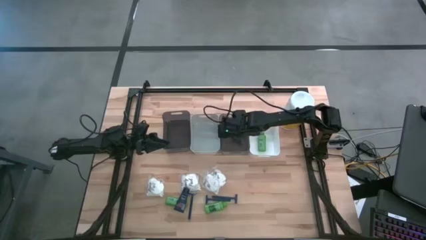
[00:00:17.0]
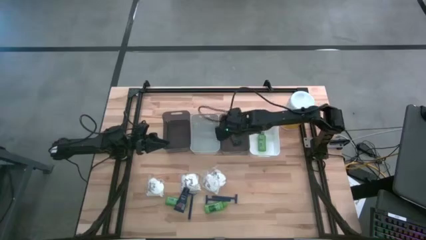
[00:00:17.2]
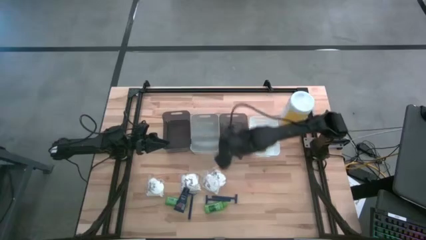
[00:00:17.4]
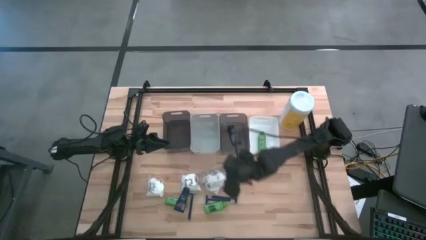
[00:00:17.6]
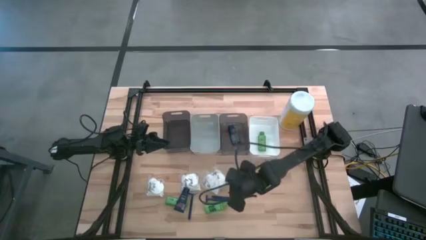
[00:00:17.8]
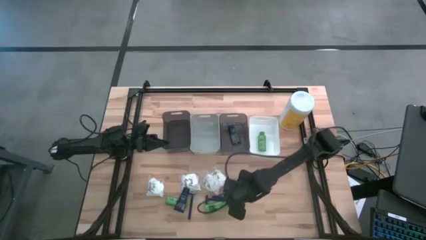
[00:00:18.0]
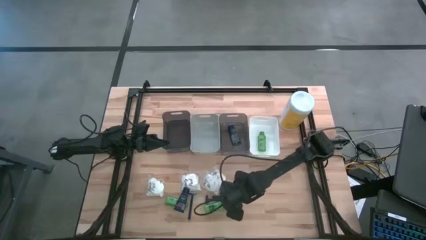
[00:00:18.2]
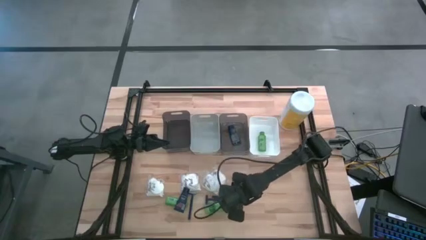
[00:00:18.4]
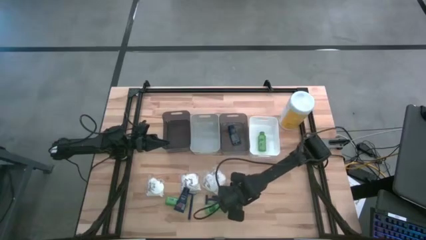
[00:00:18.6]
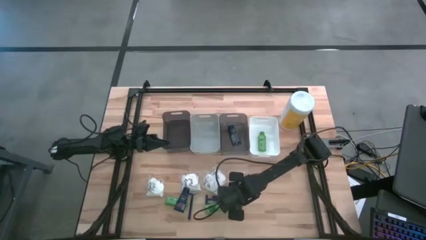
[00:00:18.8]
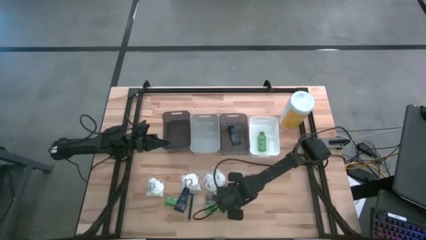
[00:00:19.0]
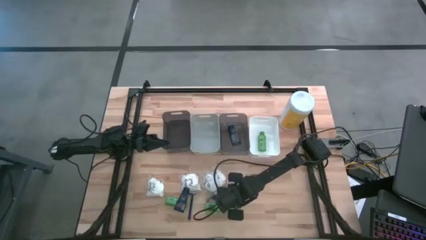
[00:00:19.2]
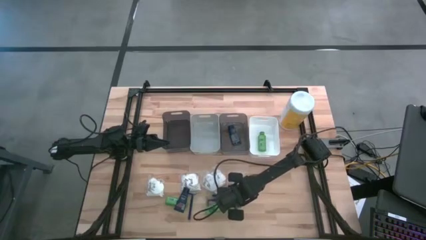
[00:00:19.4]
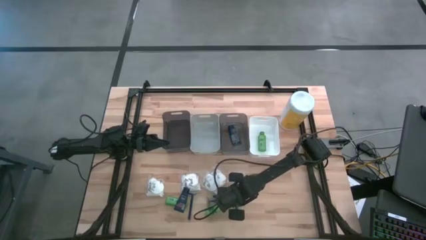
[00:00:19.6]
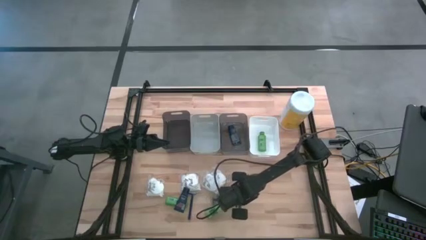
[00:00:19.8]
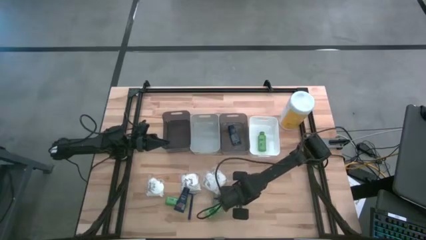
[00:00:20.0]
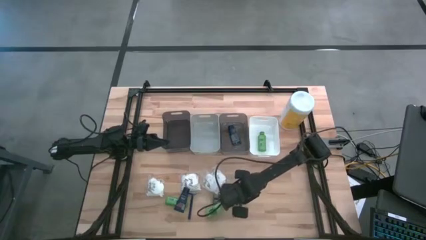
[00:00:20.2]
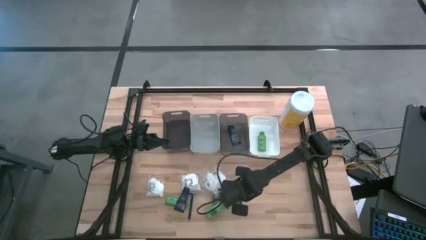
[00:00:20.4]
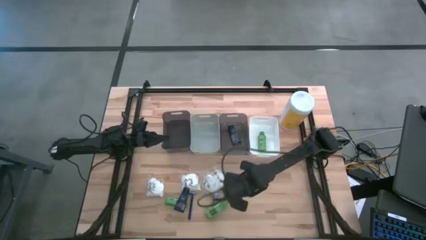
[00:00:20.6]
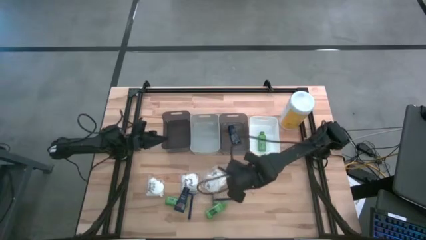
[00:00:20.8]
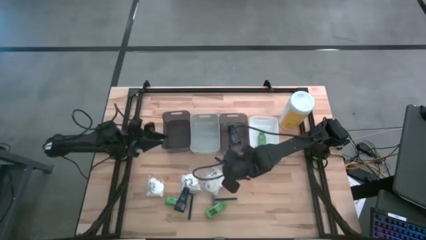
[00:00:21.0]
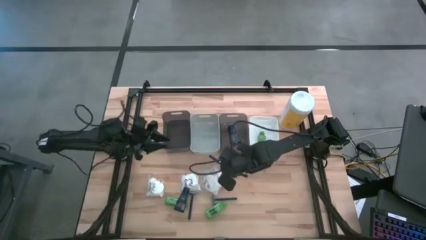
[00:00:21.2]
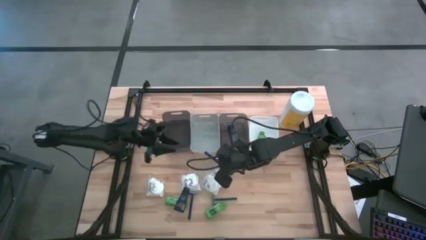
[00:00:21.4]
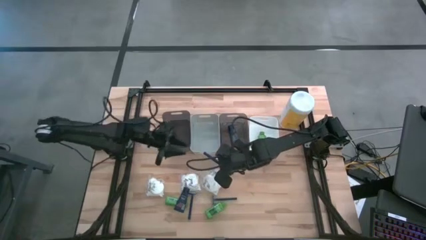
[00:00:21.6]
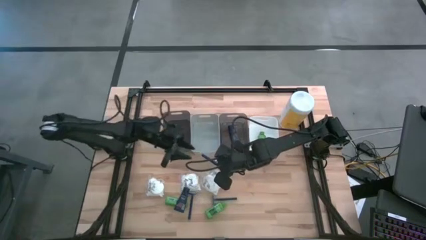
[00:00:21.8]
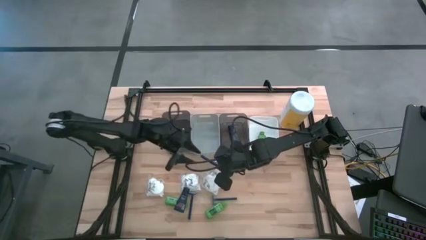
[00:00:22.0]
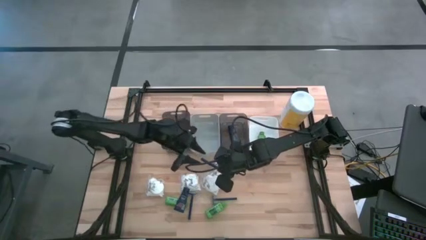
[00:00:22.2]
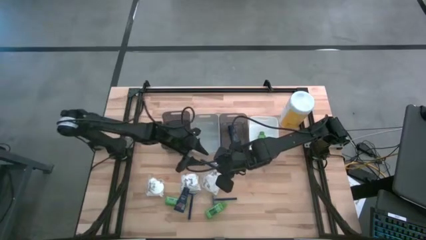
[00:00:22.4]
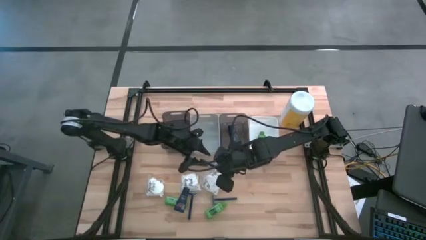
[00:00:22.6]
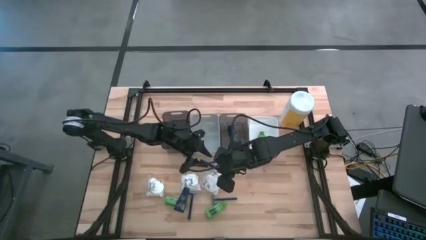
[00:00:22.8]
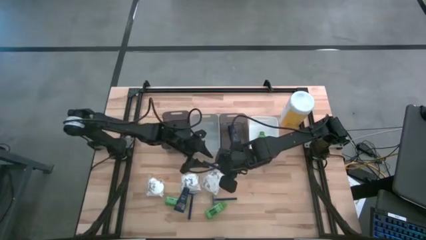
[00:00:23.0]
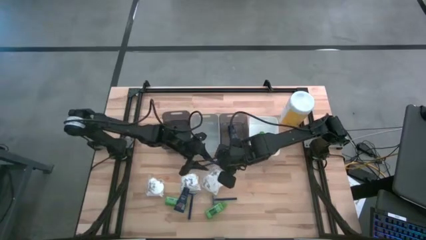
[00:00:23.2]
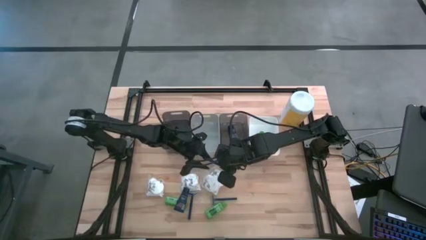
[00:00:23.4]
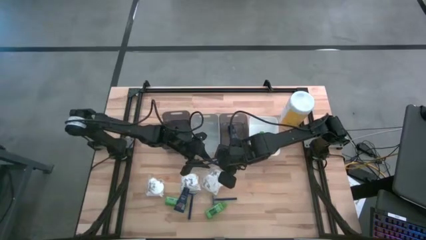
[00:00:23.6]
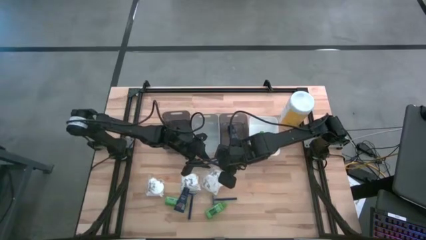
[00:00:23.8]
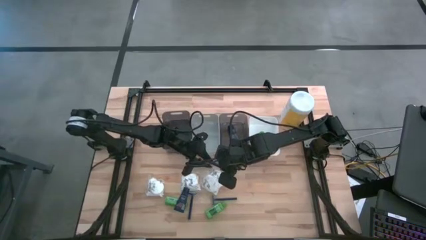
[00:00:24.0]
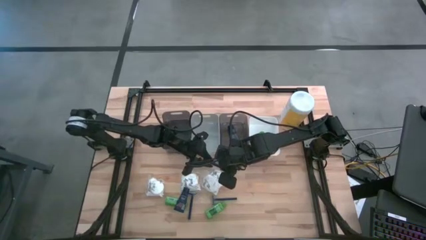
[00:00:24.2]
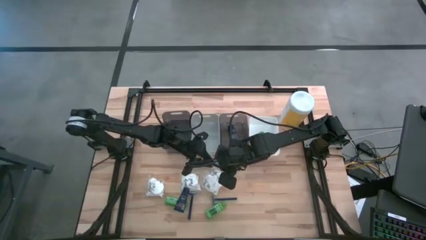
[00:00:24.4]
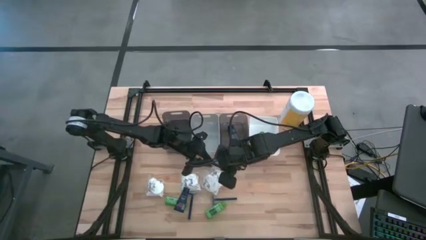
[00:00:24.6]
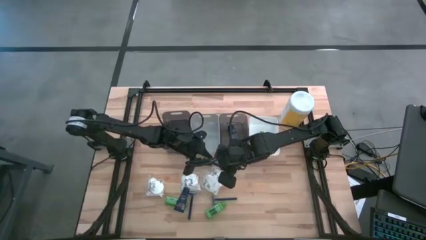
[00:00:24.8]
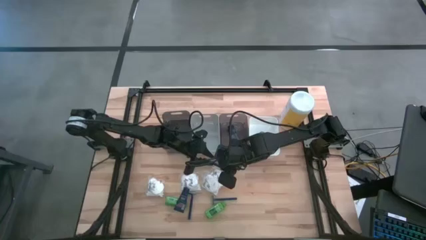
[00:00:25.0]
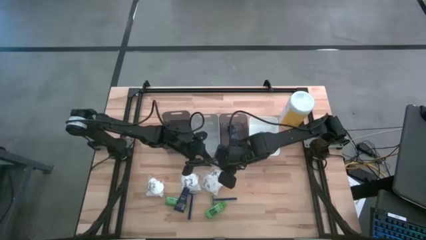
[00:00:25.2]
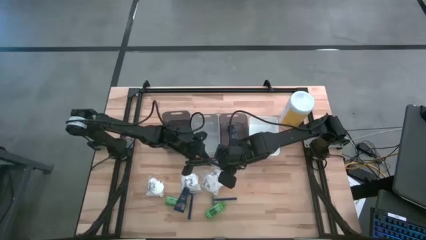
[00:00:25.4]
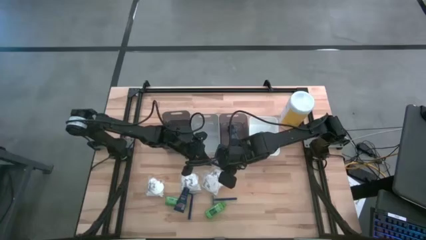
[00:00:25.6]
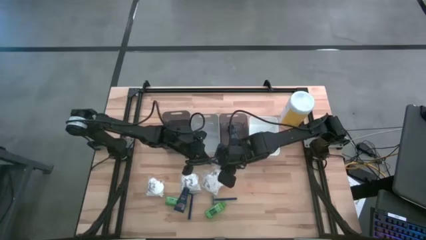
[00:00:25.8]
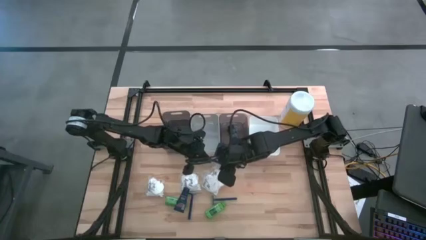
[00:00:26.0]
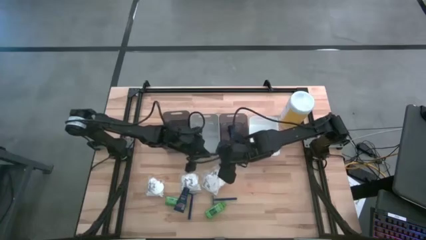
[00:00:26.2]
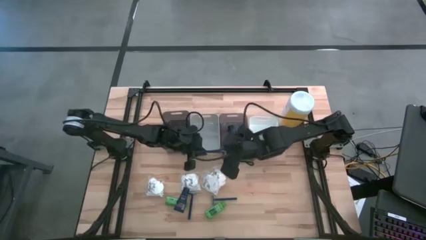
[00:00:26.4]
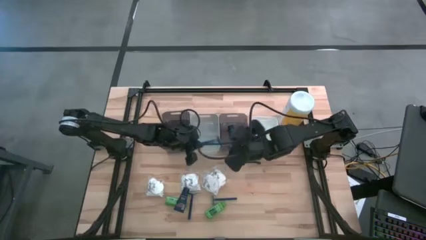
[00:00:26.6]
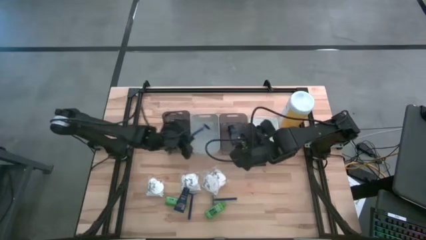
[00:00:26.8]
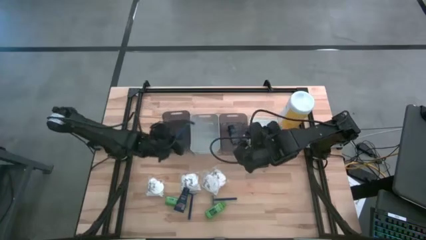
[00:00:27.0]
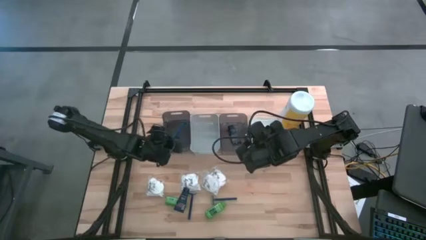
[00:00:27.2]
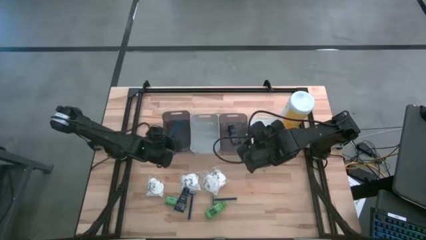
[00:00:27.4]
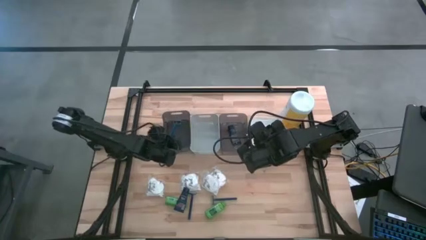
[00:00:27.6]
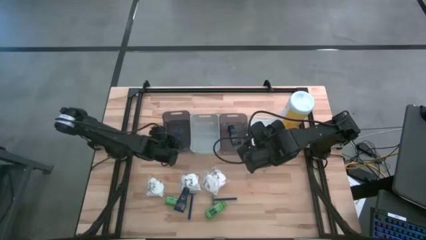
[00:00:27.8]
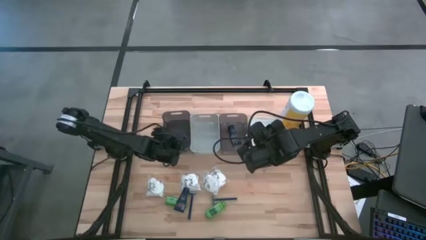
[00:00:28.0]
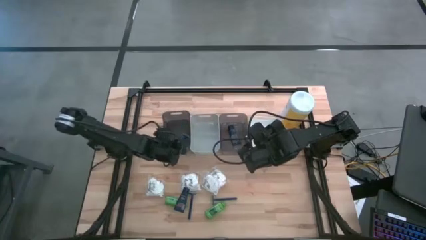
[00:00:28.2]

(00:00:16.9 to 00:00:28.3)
Task: Pick & Place Travel size toiletries
Put the blue razor into the left black bin

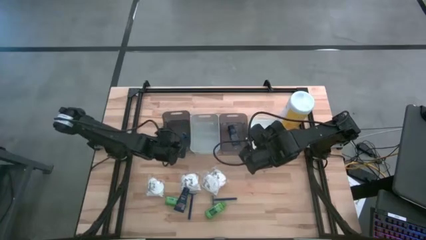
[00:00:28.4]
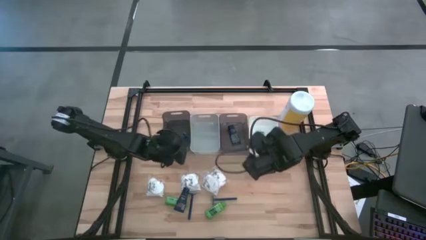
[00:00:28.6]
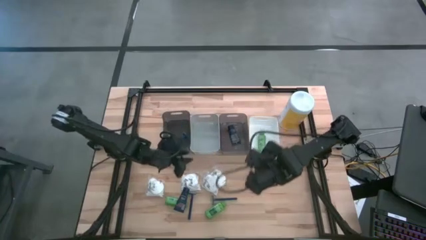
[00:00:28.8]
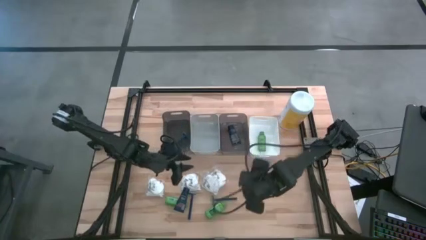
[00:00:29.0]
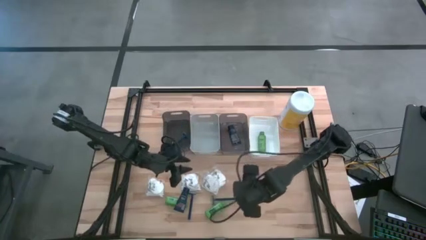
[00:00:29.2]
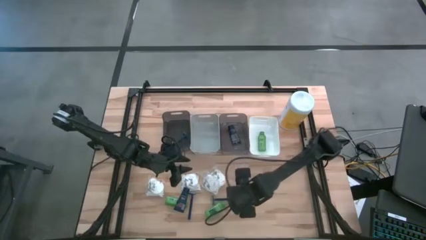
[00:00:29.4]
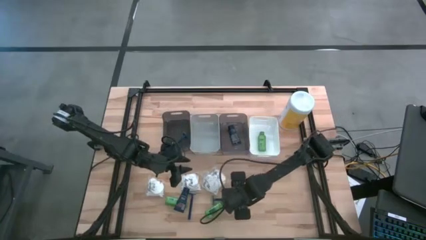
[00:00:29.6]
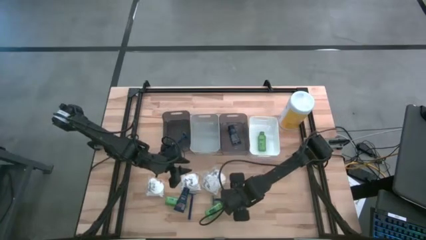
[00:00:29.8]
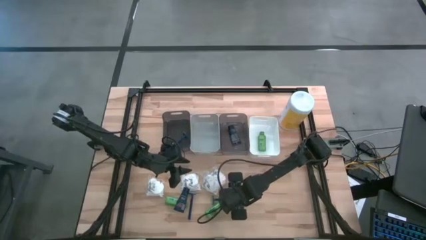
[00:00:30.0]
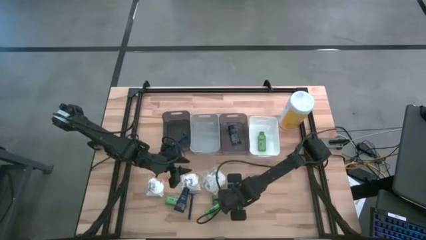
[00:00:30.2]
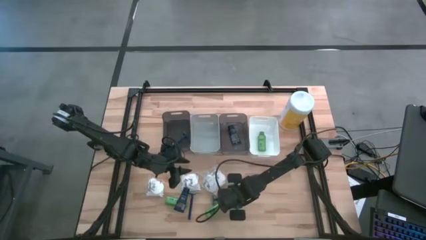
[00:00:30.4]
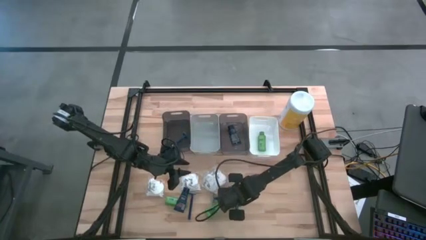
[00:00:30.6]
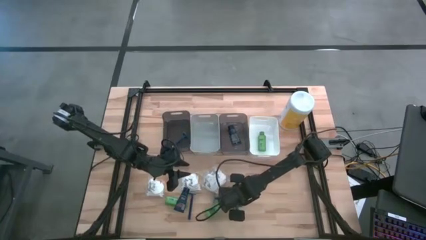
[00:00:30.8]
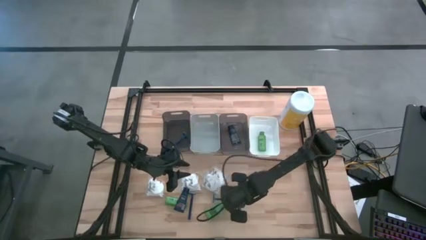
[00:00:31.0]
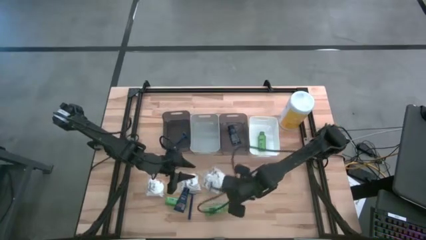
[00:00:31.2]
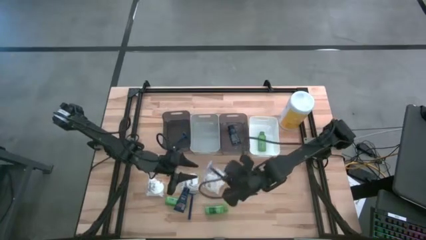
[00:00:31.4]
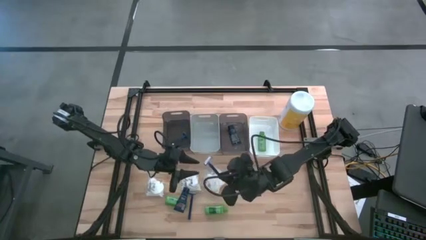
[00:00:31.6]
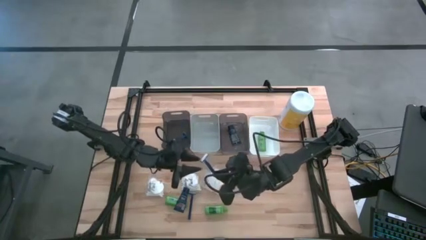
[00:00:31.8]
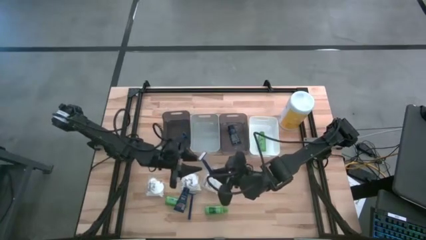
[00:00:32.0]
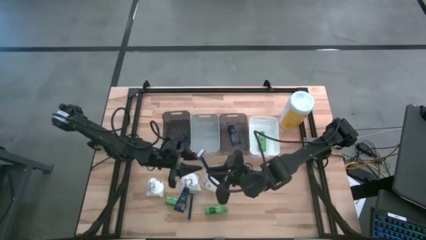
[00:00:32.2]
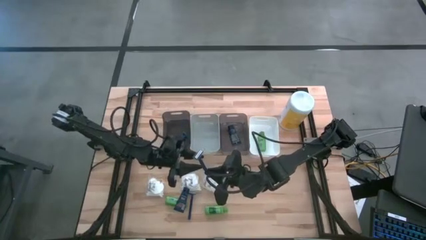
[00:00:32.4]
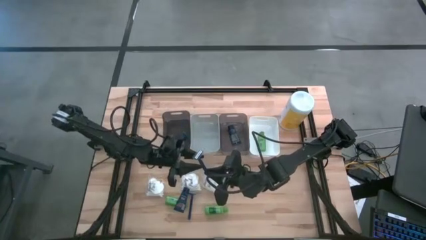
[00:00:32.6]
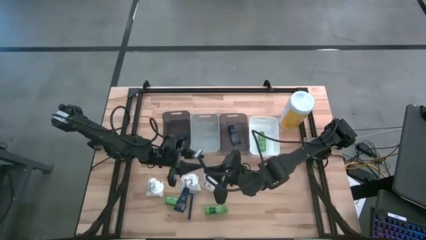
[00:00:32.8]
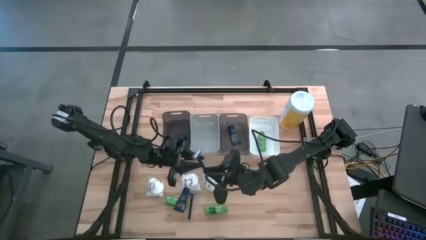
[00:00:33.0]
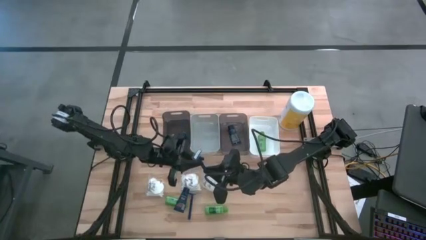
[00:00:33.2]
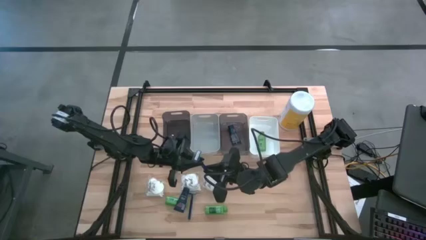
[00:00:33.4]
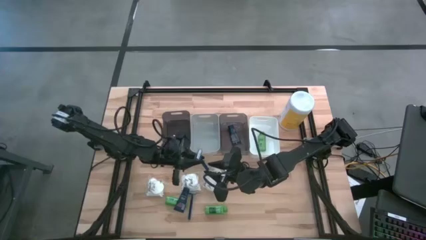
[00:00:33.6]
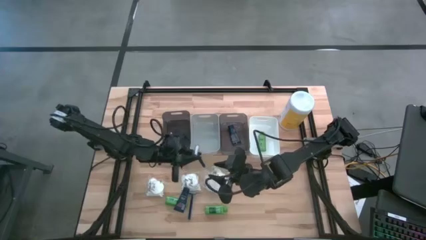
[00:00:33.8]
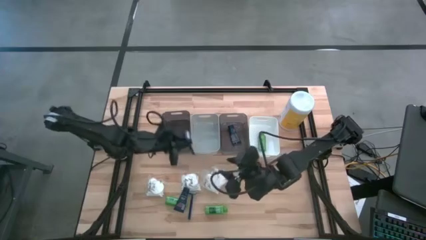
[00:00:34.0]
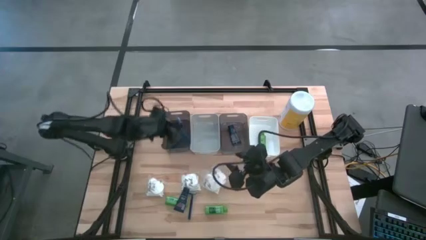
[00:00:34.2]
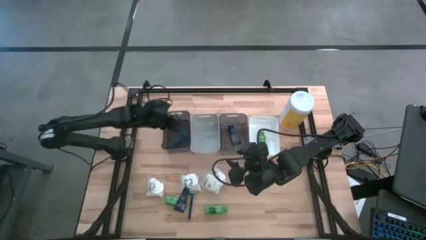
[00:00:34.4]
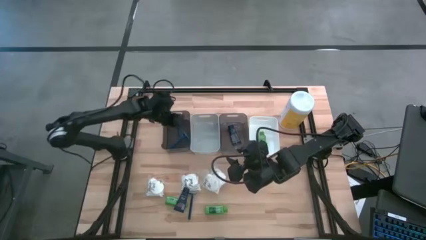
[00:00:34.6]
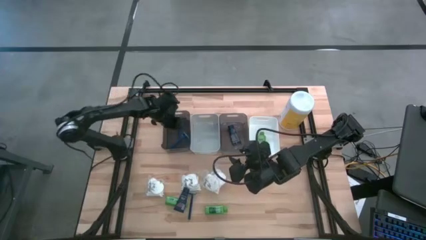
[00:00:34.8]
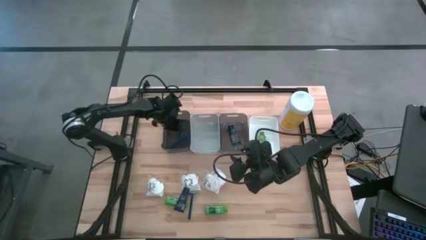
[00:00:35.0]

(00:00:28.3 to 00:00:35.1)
Put the blue razor into the left black bin
